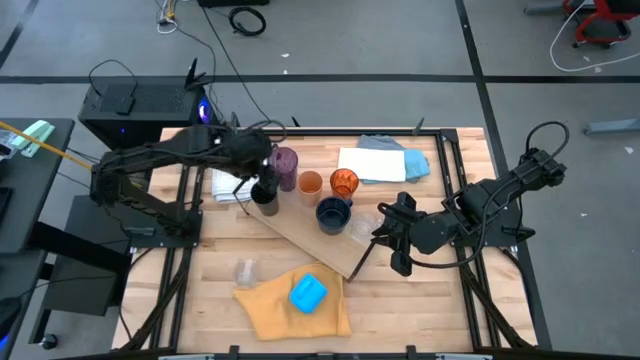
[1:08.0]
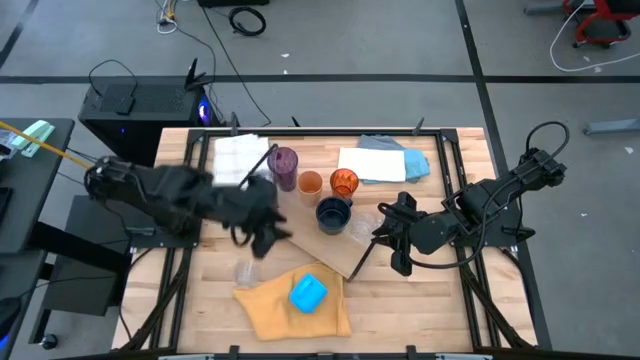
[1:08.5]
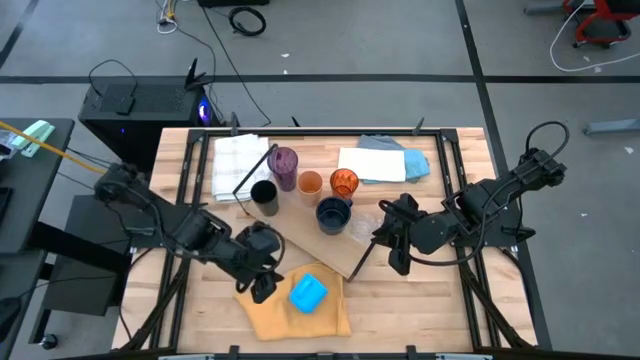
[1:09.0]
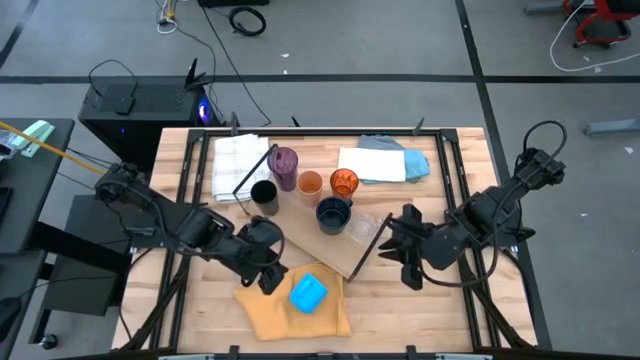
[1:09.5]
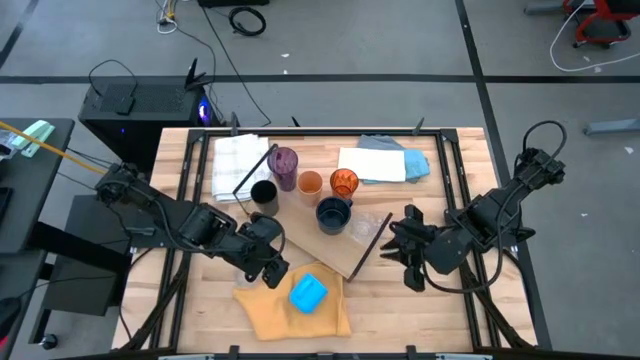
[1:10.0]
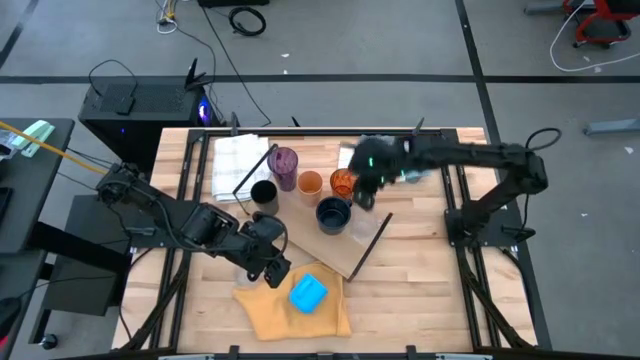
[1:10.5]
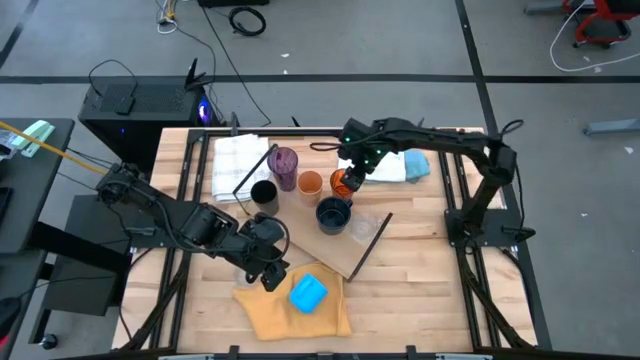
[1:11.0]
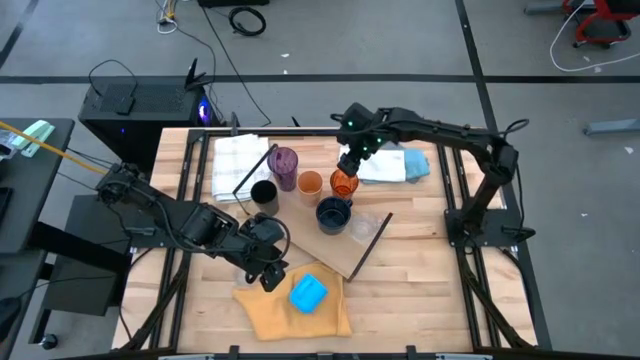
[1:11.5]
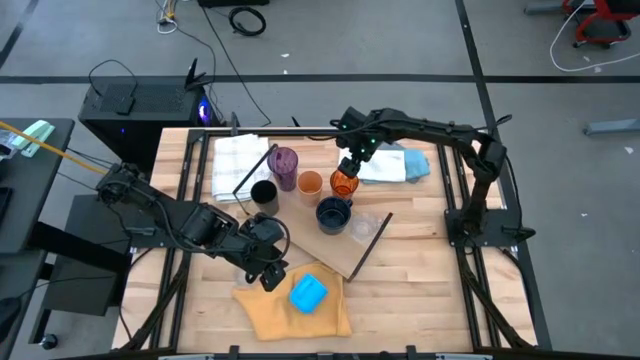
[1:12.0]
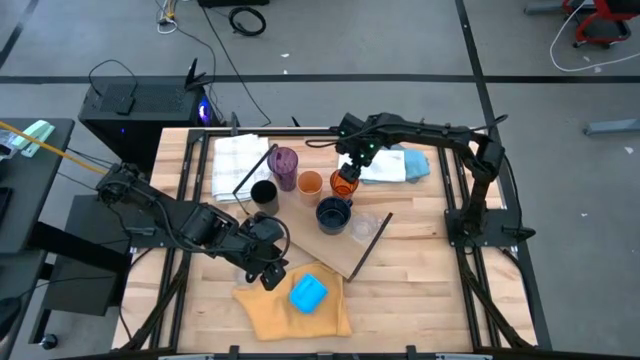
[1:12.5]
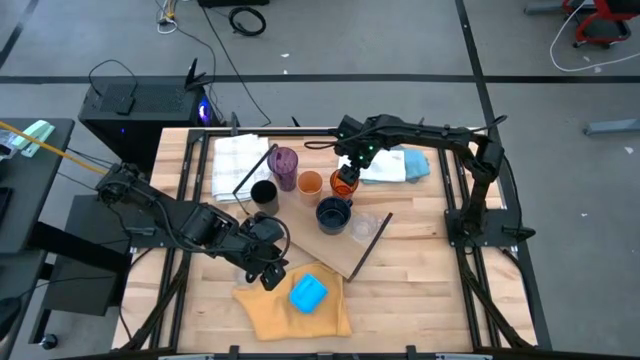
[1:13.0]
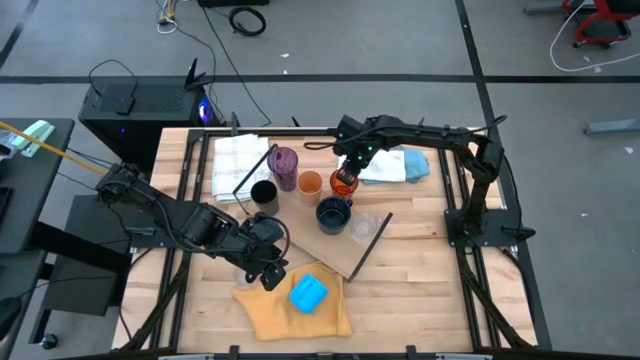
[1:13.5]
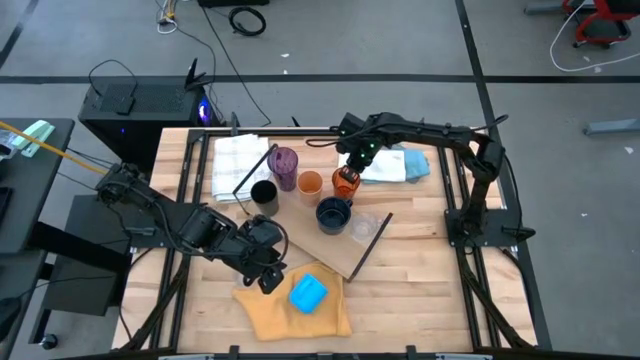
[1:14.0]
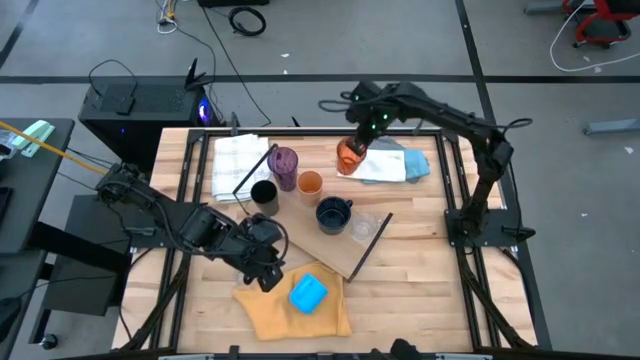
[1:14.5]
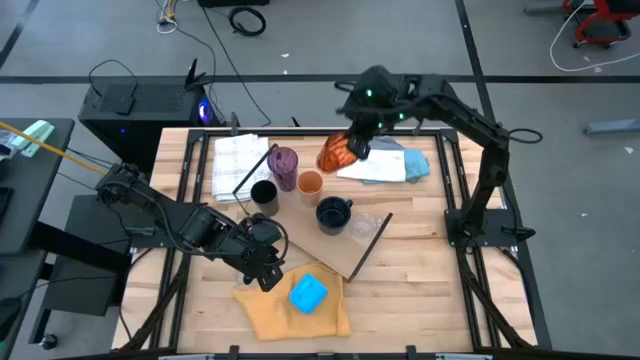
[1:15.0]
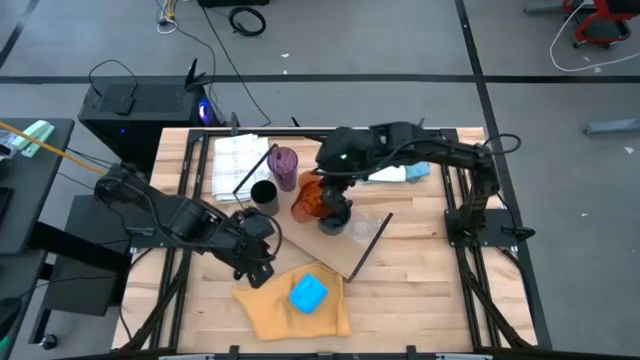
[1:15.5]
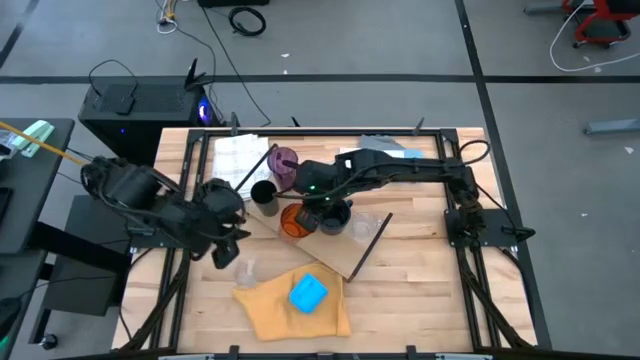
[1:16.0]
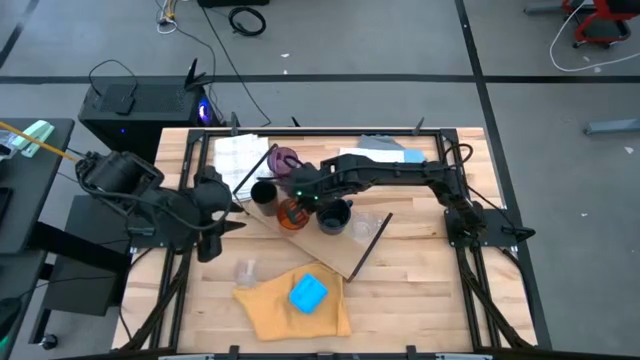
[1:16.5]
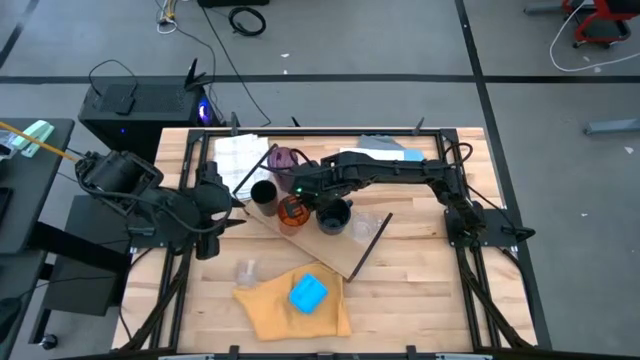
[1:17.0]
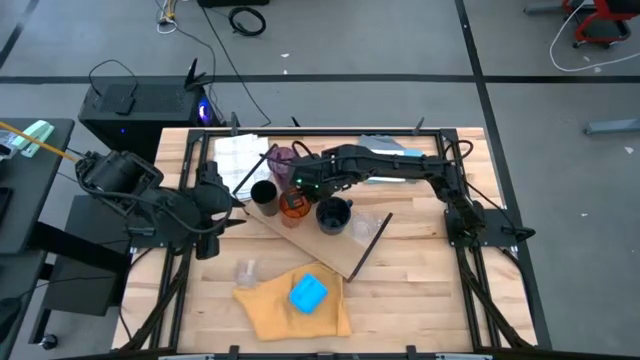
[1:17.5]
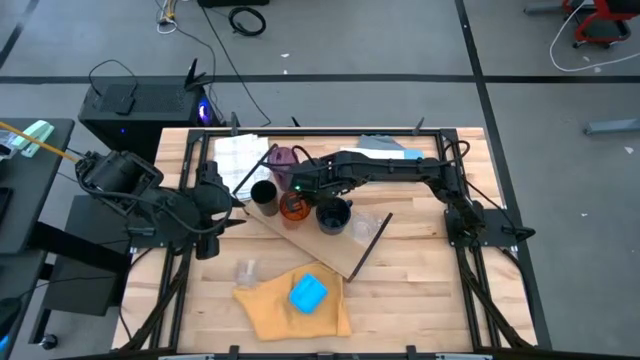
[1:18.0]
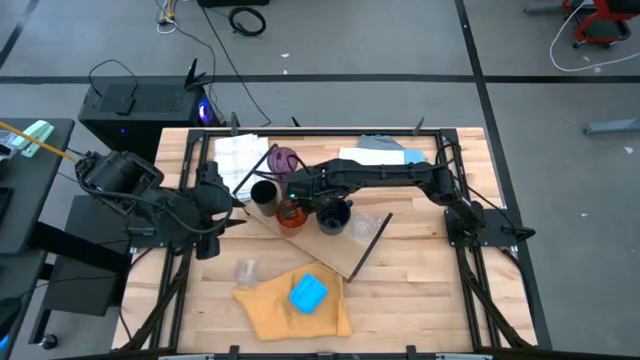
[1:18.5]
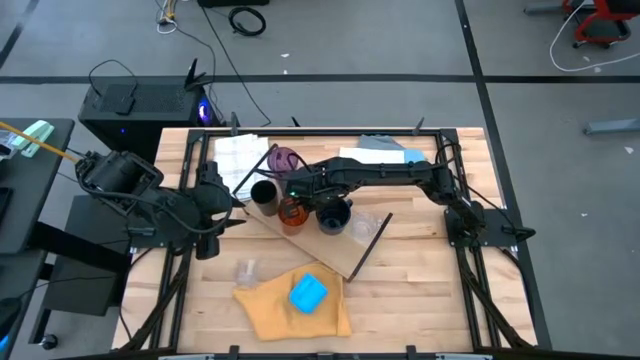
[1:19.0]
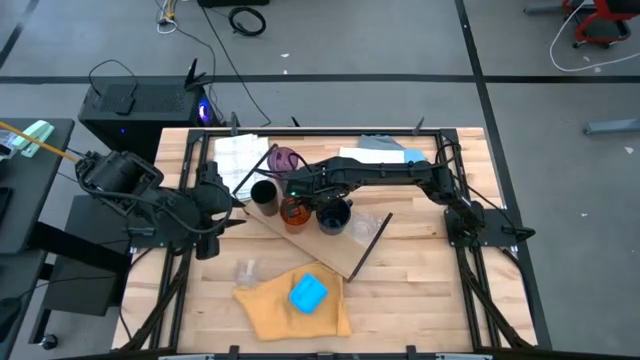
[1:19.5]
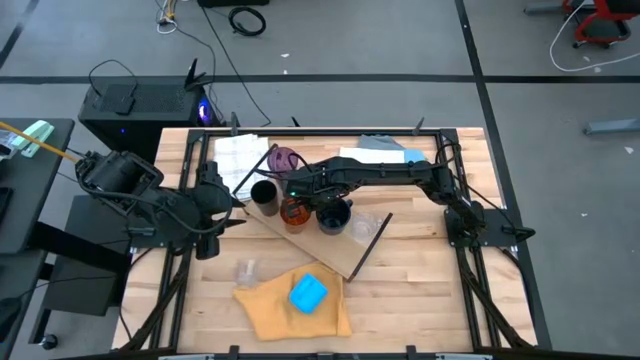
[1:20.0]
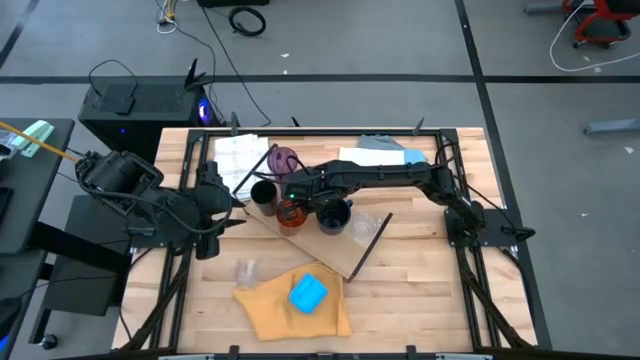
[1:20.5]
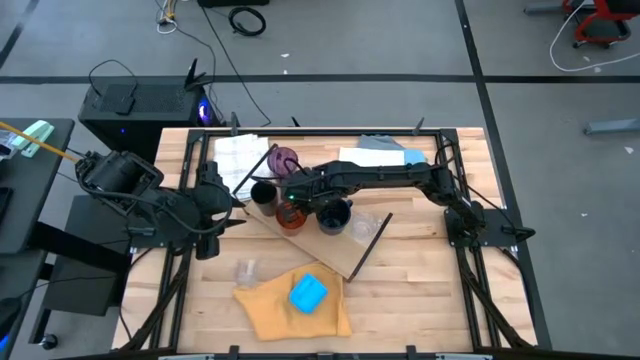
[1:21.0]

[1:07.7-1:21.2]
Task: Stack small to large cups/mugs on shelf
Put the orange cup on the shelf
